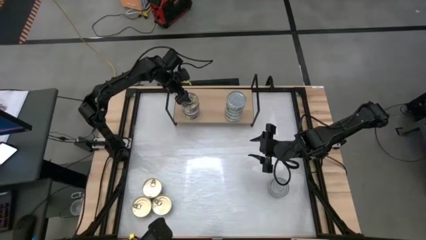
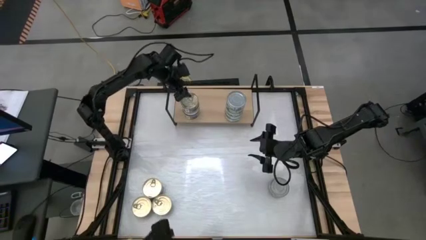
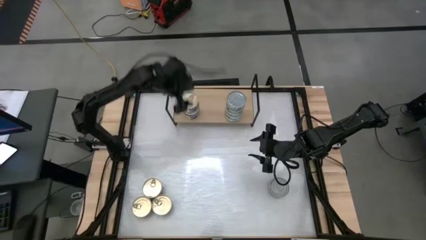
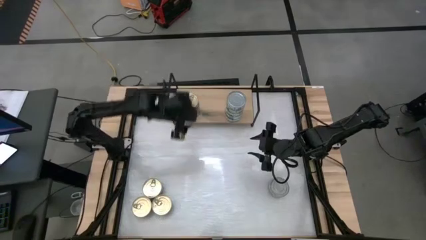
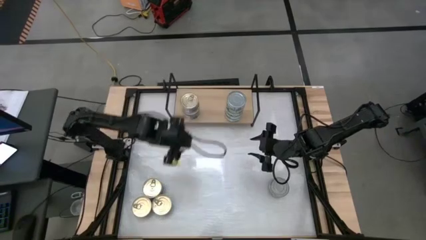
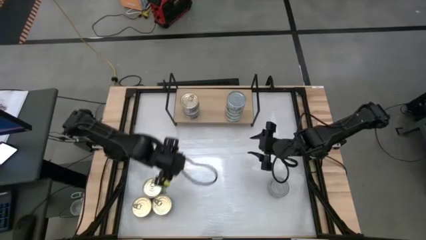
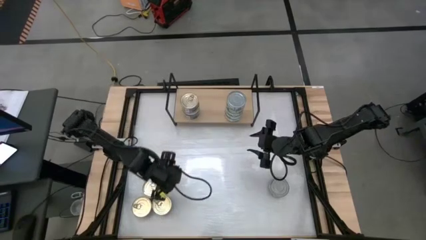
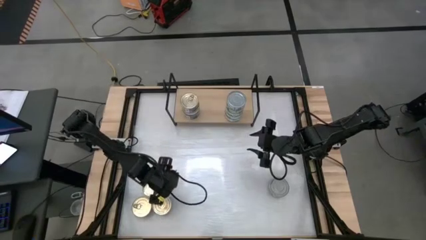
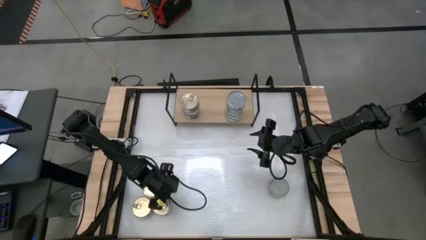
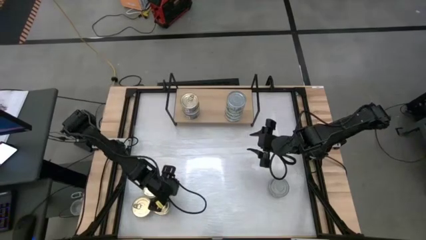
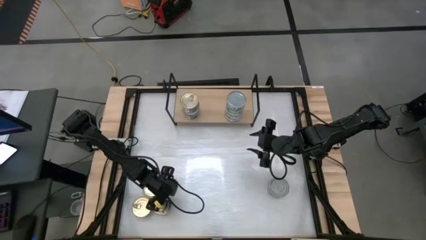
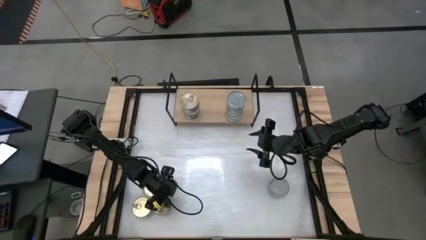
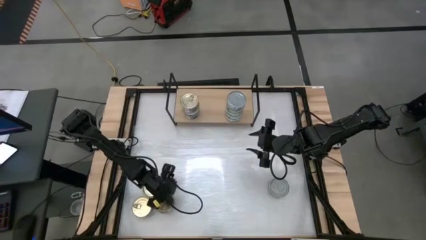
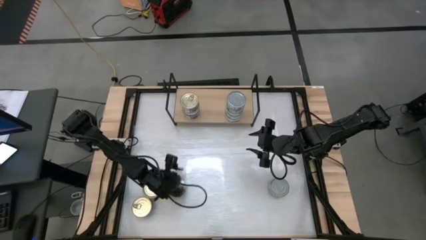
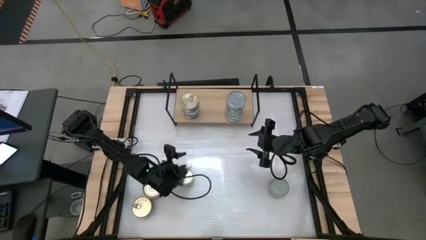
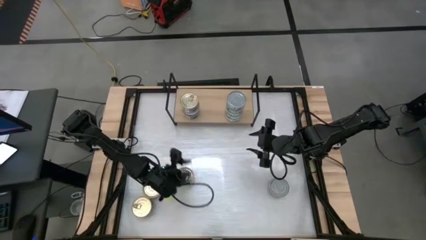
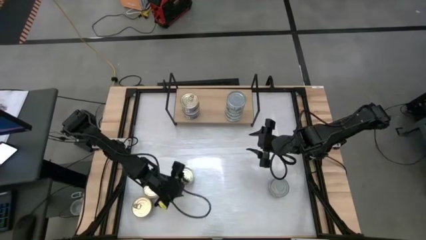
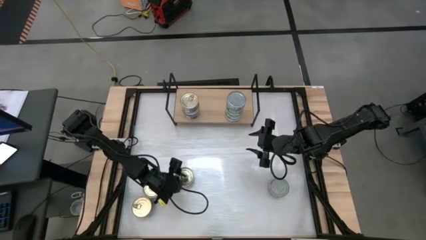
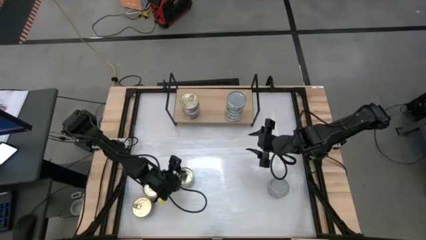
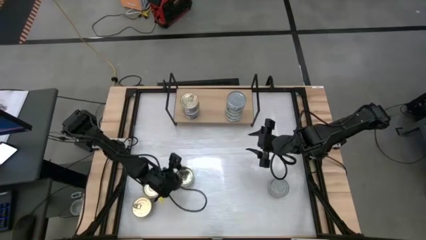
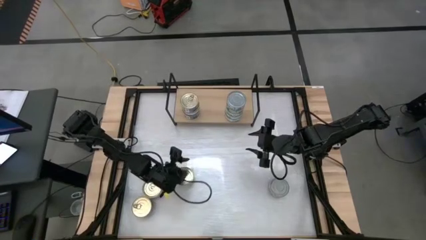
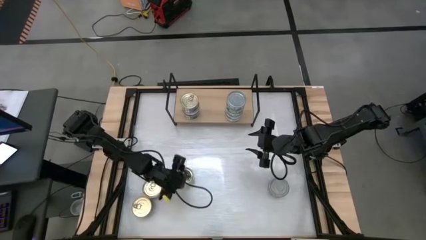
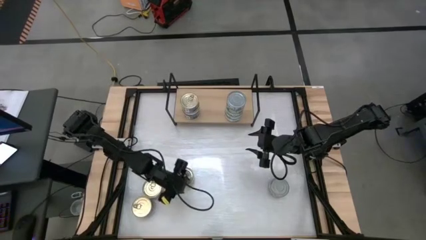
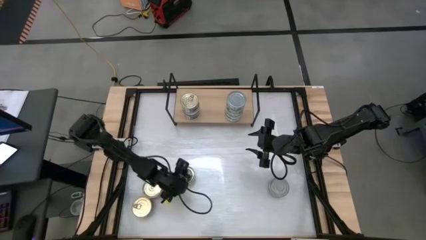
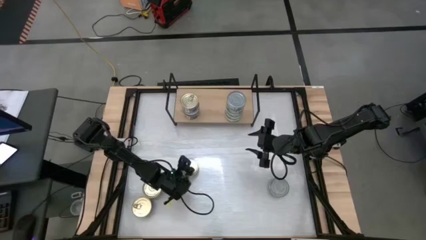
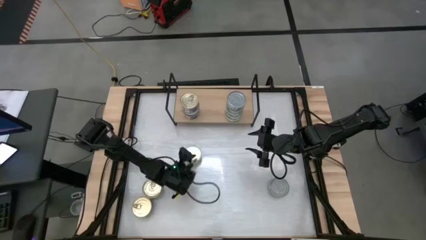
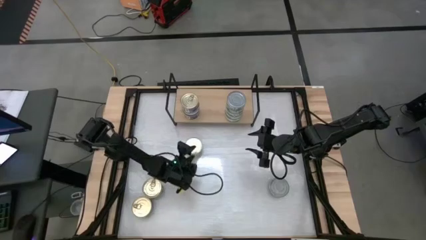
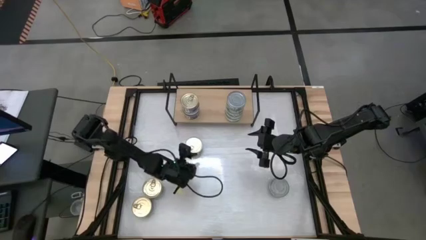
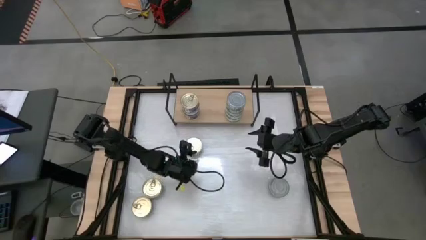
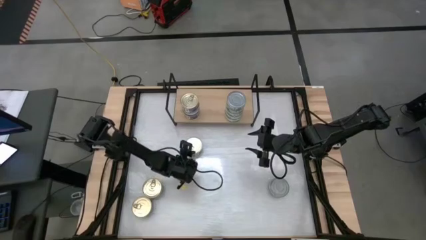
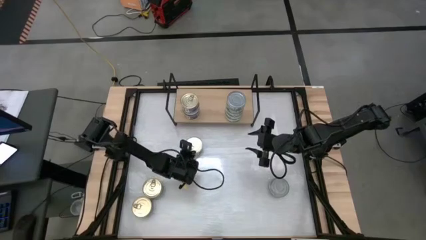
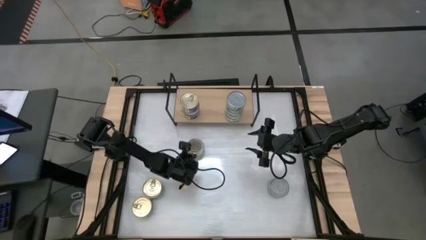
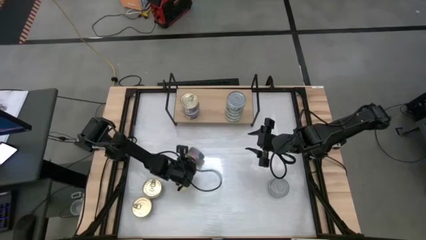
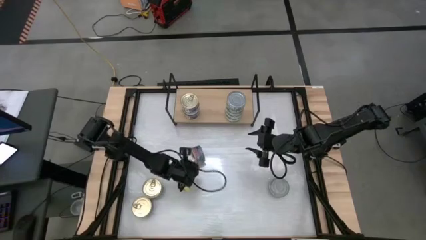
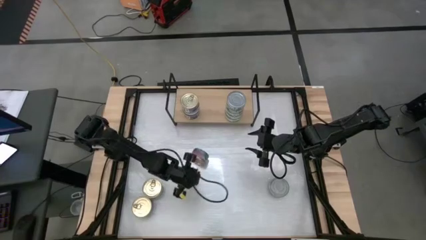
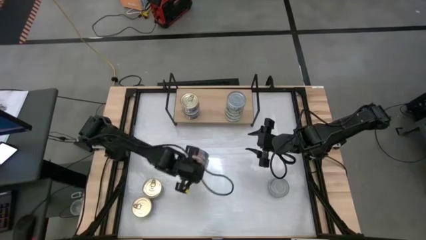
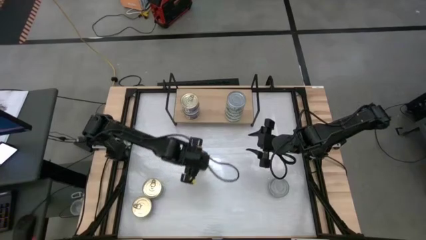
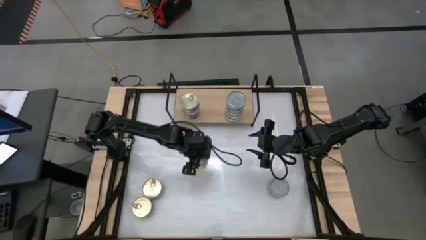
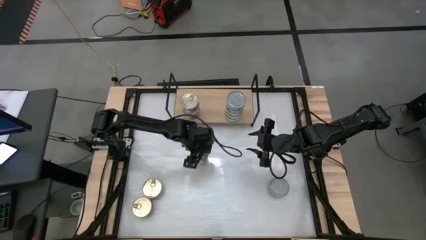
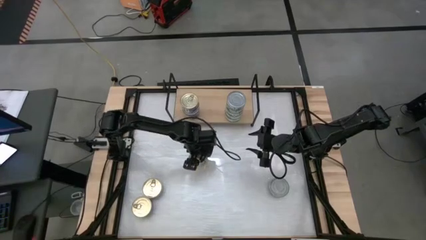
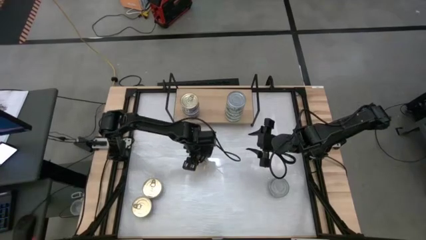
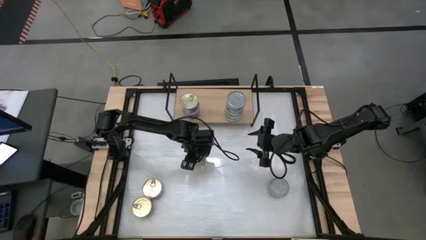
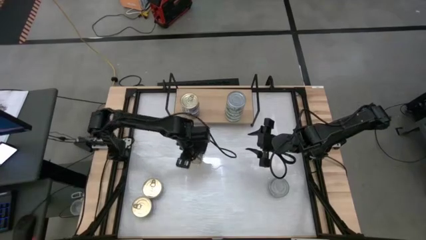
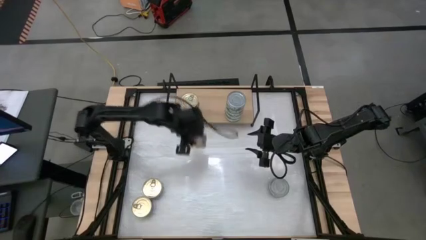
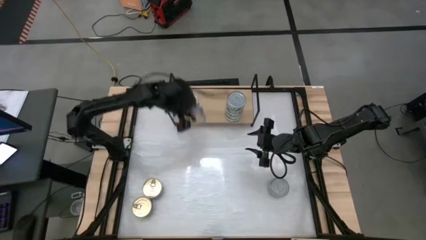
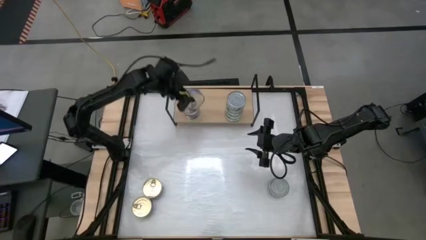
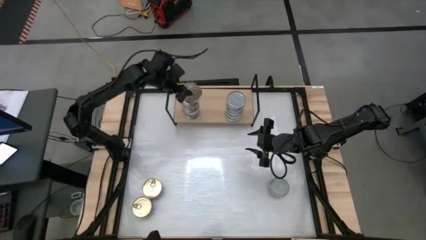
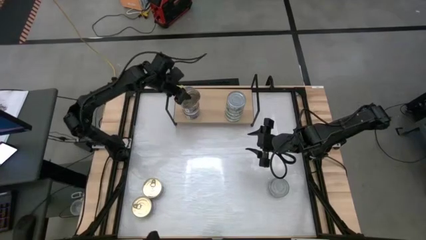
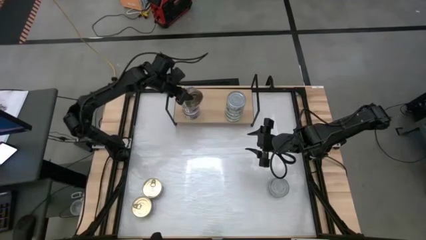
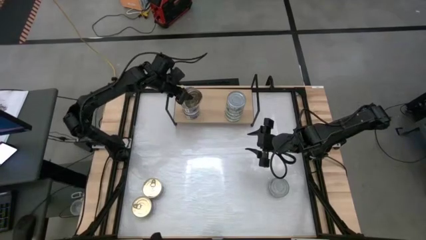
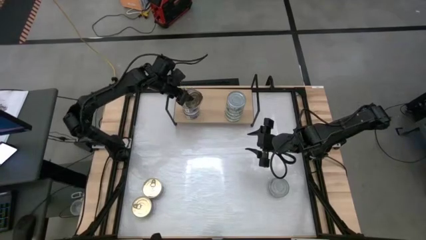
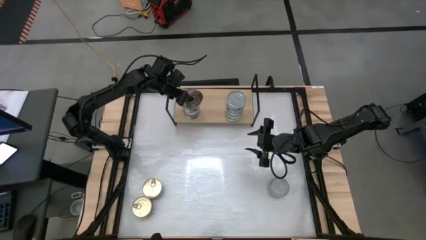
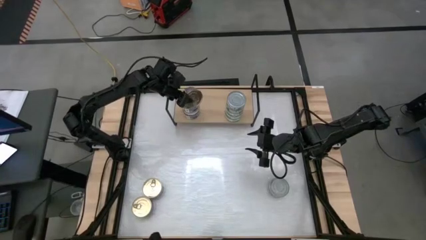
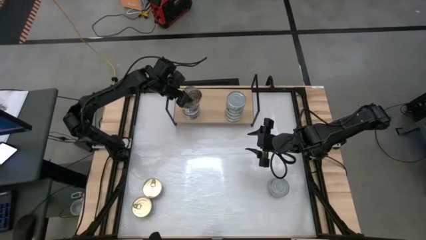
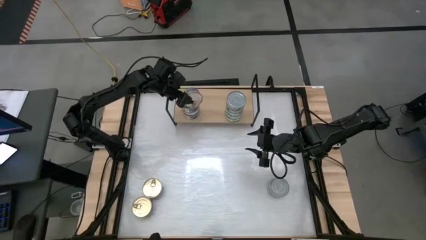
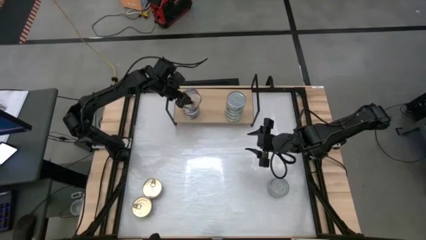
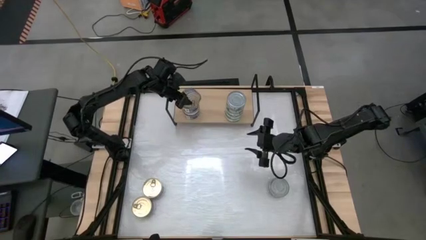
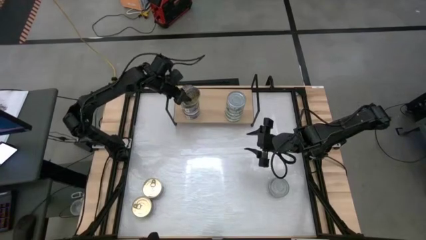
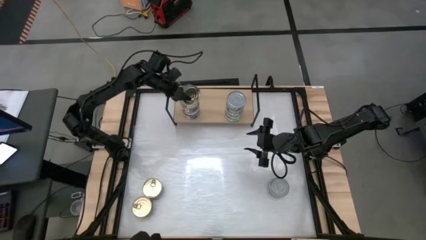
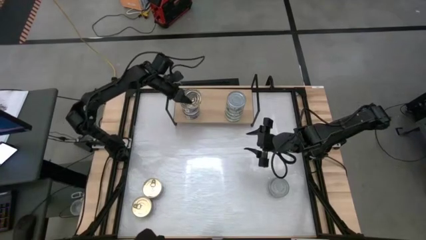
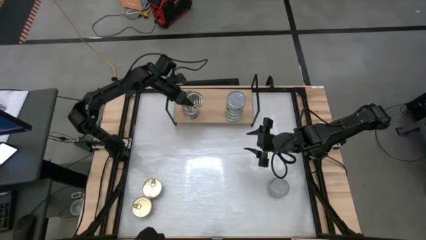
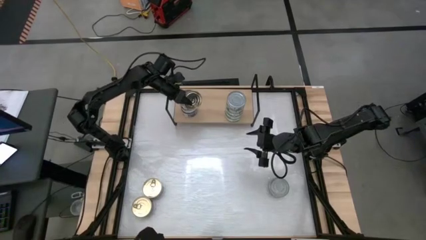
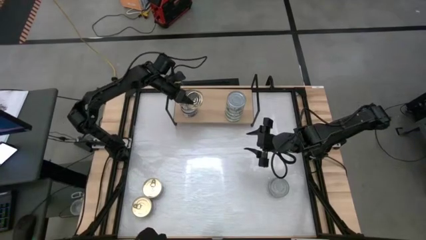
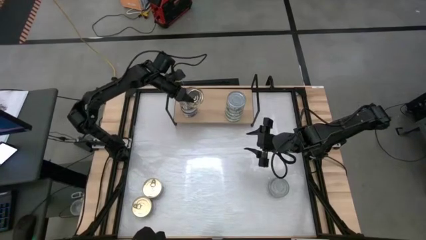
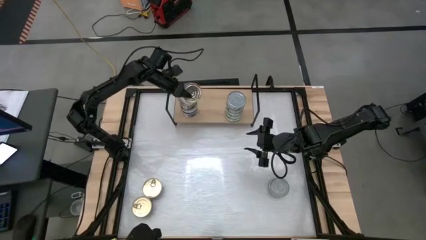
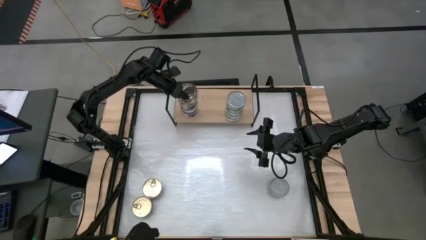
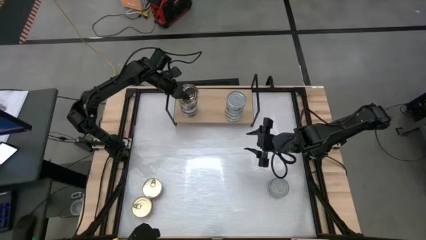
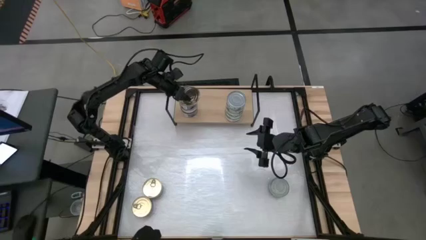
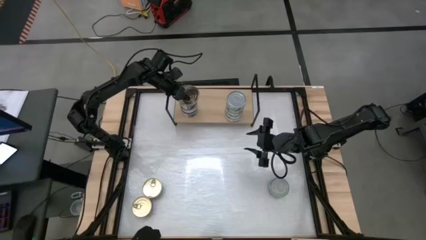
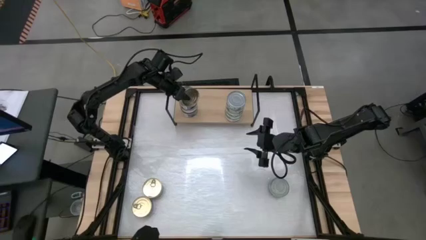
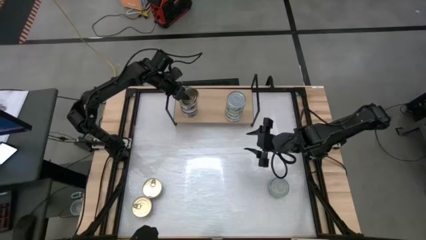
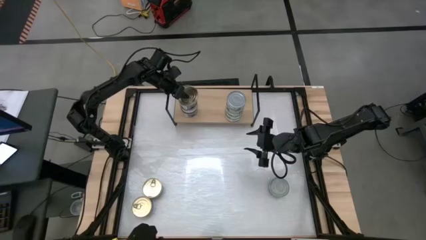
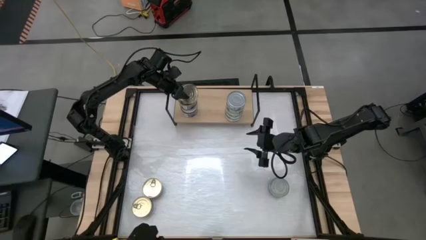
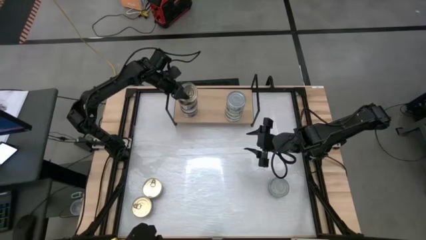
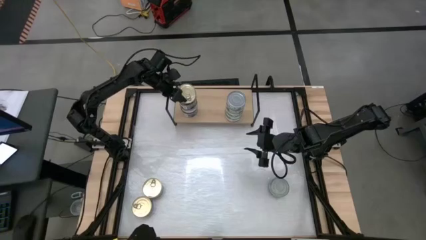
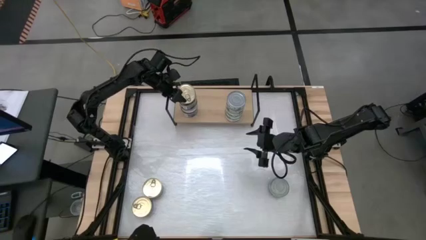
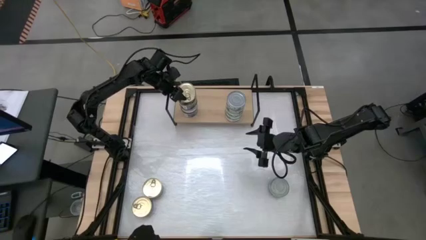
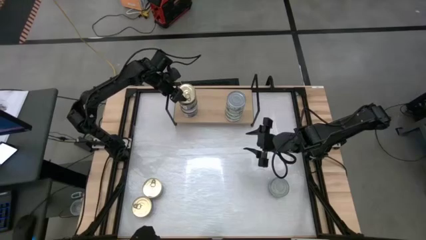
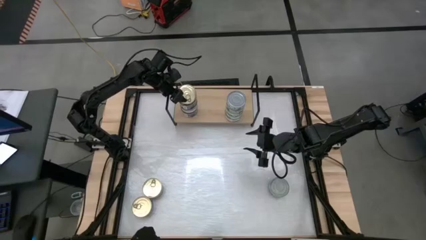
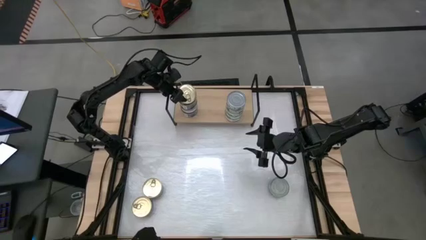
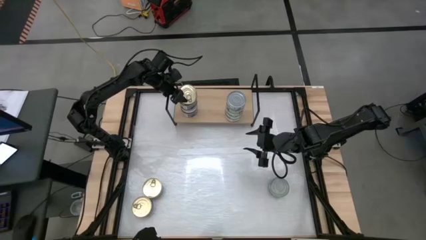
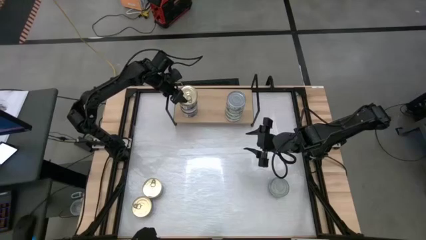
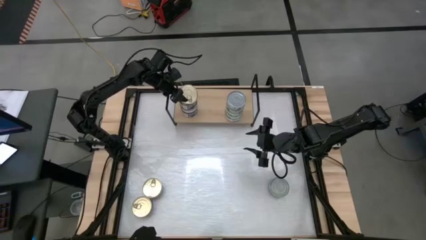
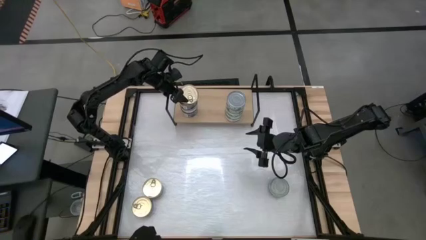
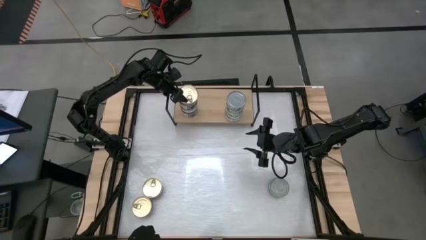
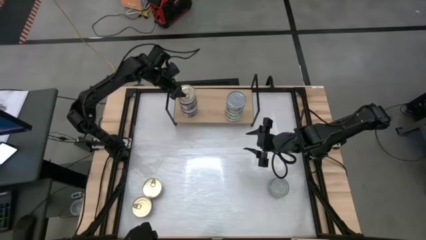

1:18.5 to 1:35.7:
Task: Stack canned seafood by type on shelf
Stack the blue pink tuna can on top of the blue pink tuna can on the shelf
